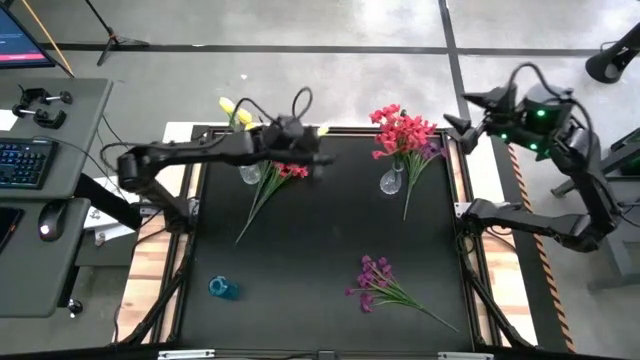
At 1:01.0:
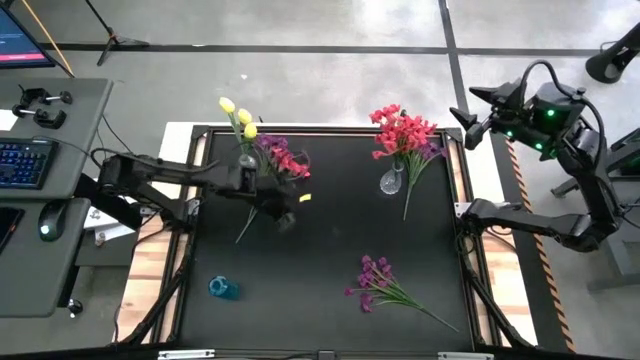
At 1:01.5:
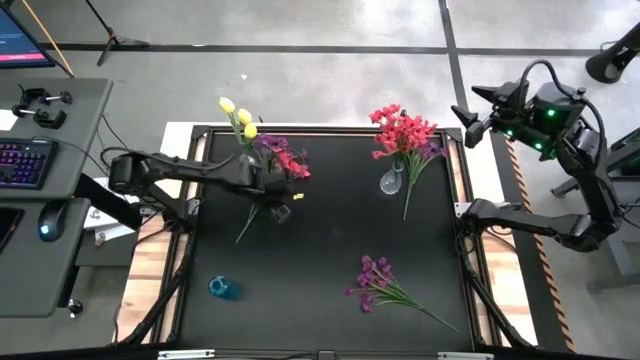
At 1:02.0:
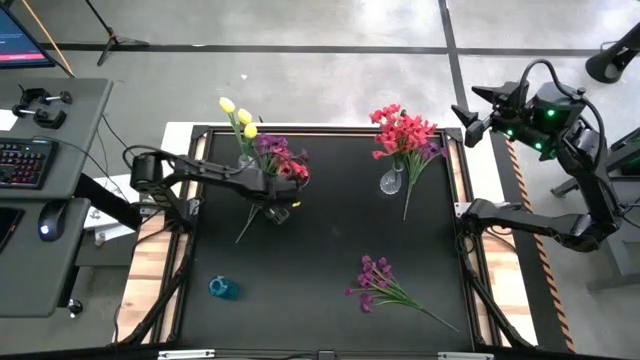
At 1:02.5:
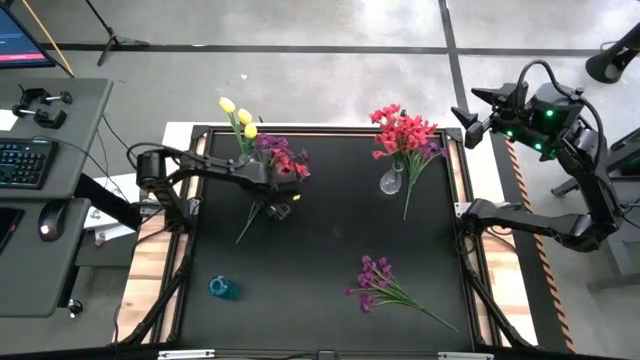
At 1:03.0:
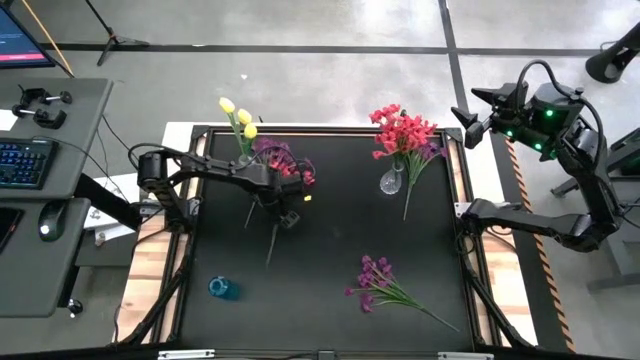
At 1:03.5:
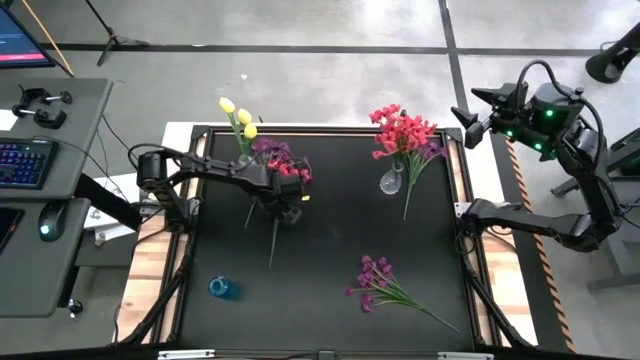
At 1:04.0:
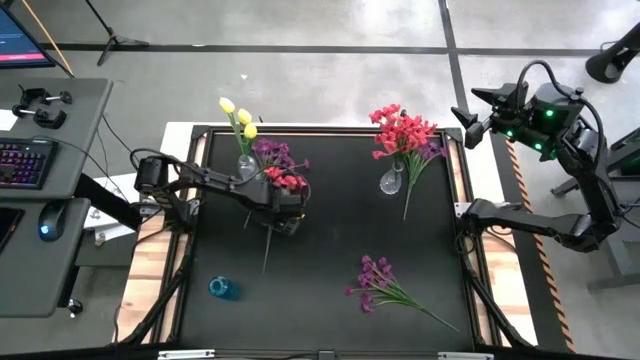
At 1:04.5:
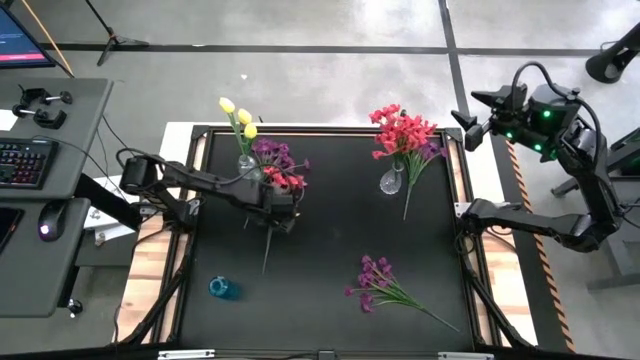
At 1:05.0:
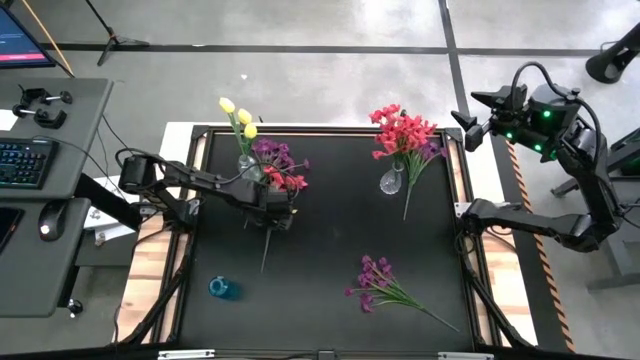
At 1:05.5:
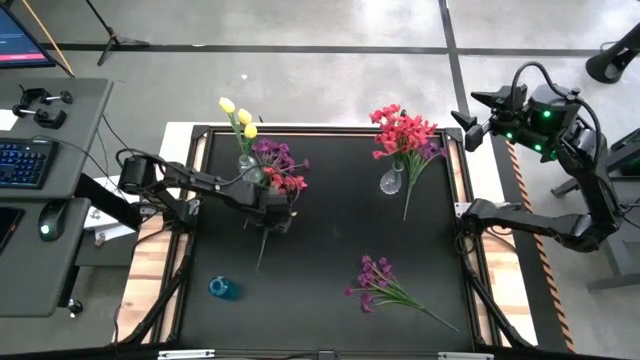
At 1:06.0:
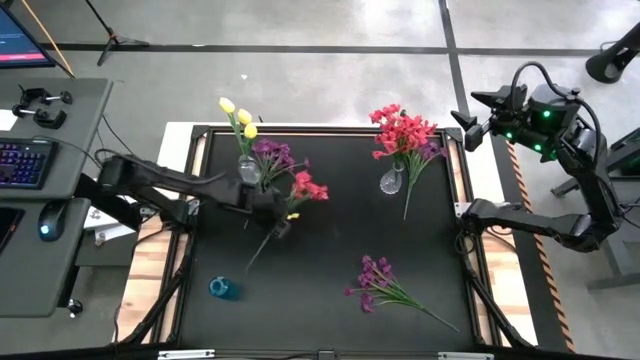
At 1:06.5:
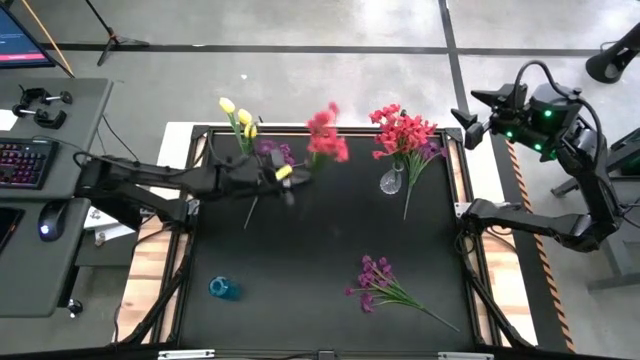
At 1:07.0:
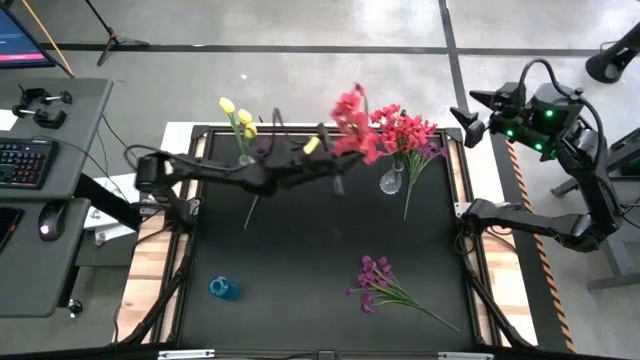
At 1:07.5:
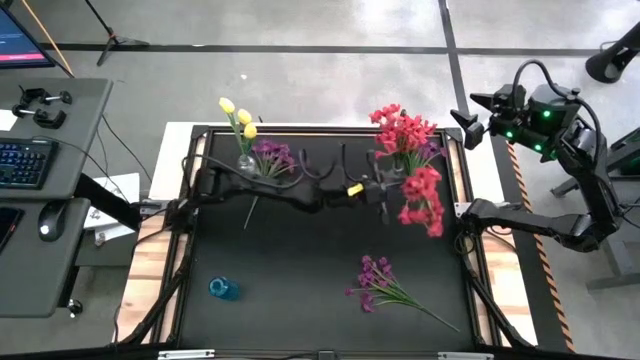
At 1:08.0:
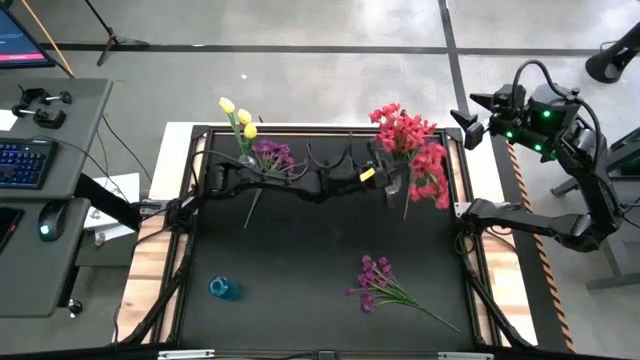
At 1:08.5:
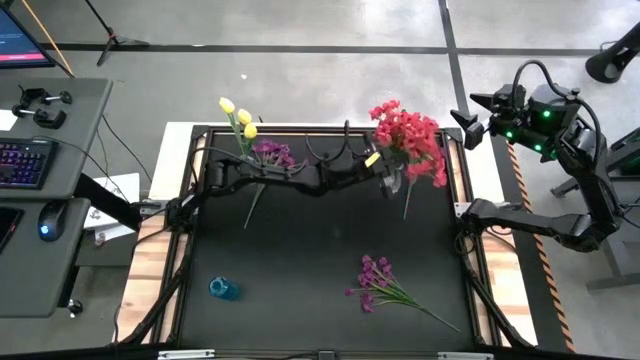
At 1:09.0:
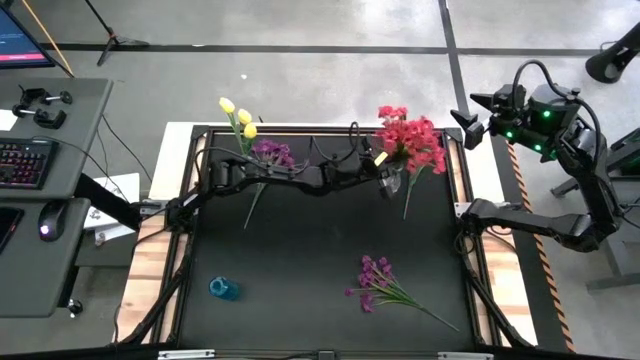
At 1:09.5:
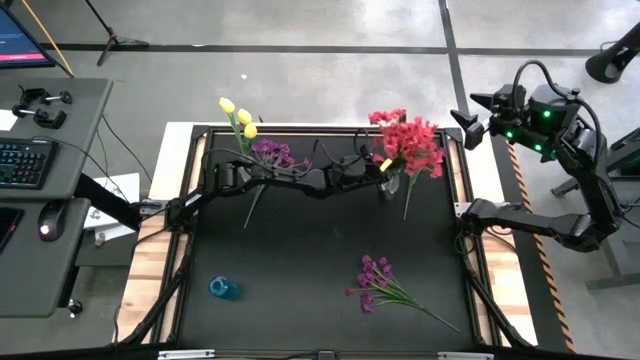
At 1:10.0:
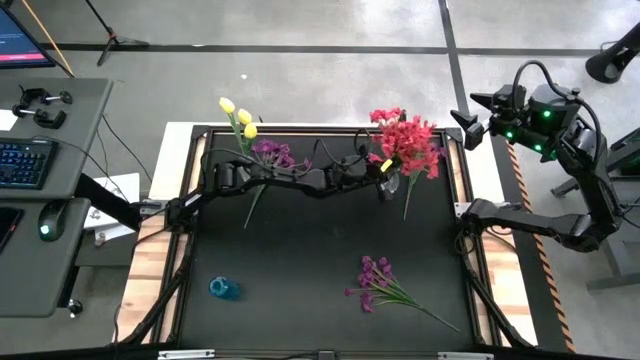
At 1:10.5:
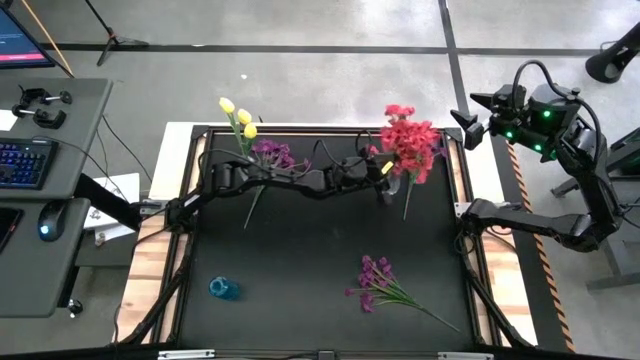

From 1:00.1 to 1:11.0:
Task: Sort flowers into vase by color
Put the red flowers into the right transparent vase

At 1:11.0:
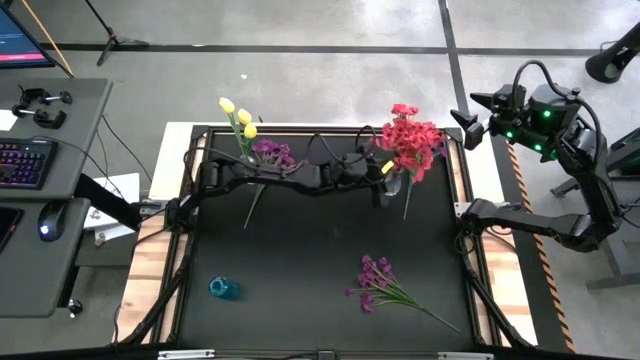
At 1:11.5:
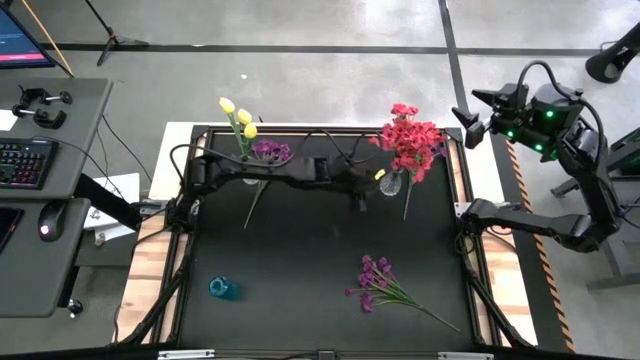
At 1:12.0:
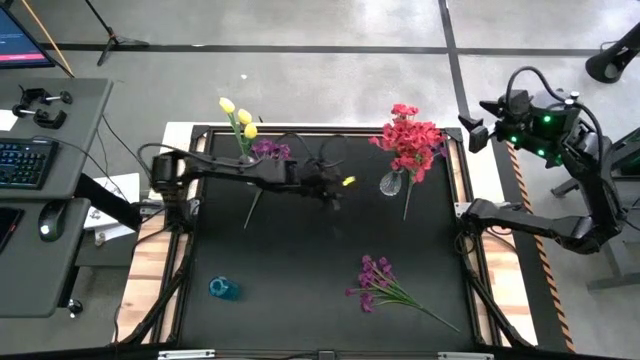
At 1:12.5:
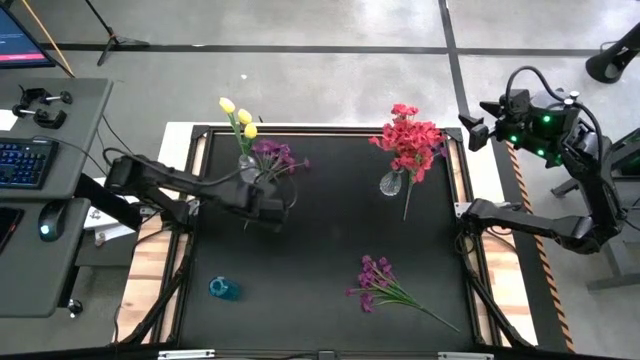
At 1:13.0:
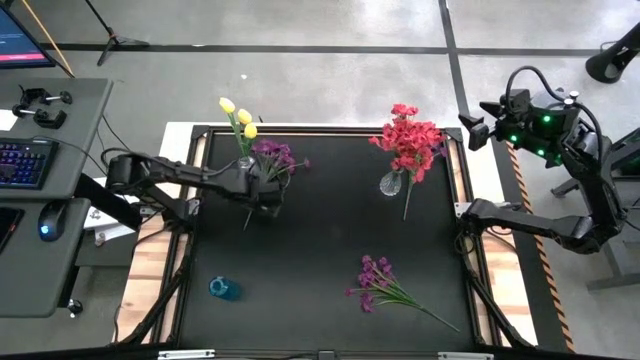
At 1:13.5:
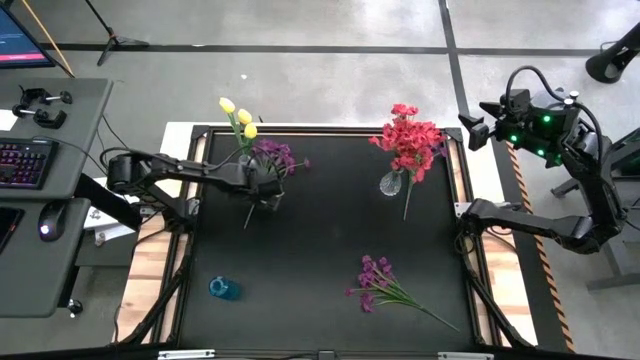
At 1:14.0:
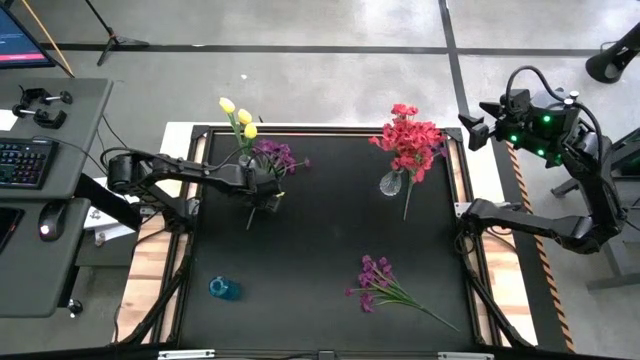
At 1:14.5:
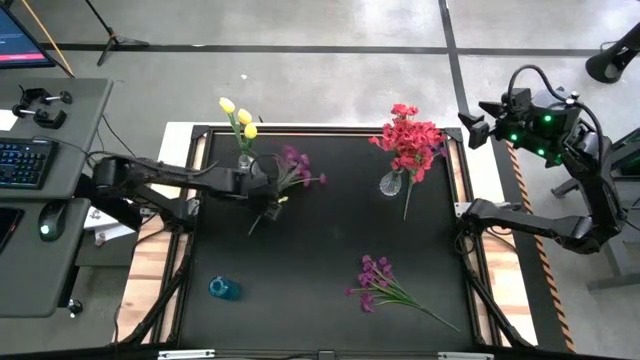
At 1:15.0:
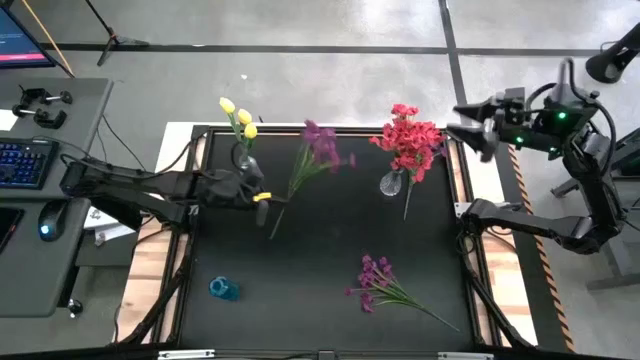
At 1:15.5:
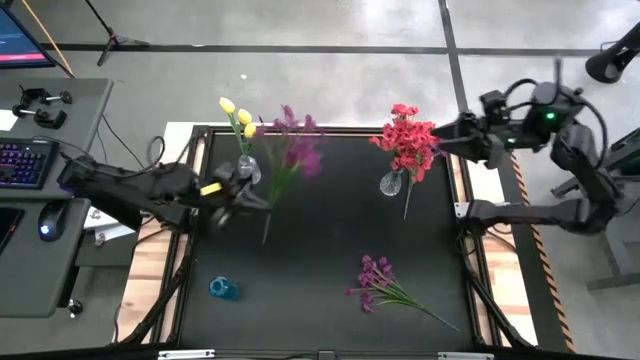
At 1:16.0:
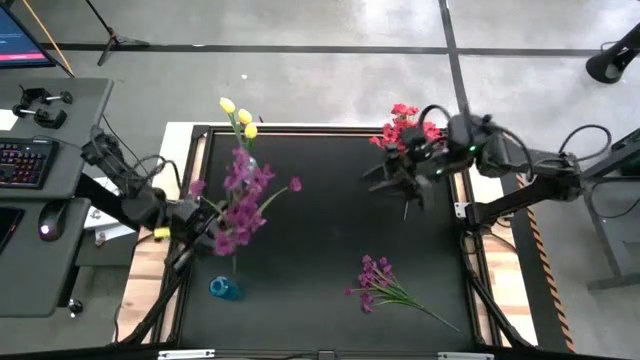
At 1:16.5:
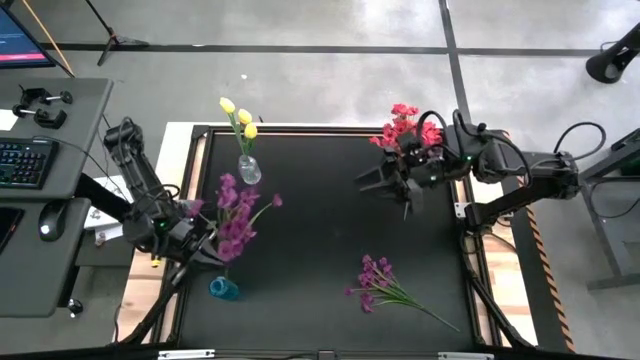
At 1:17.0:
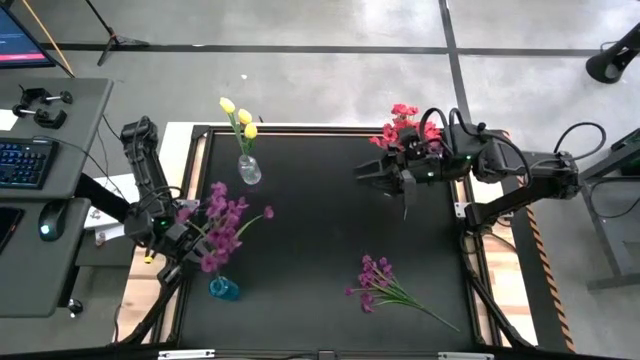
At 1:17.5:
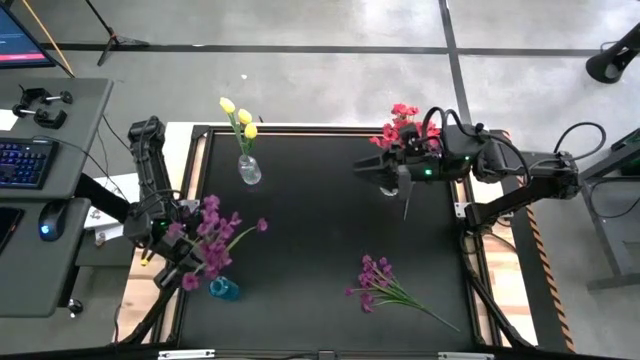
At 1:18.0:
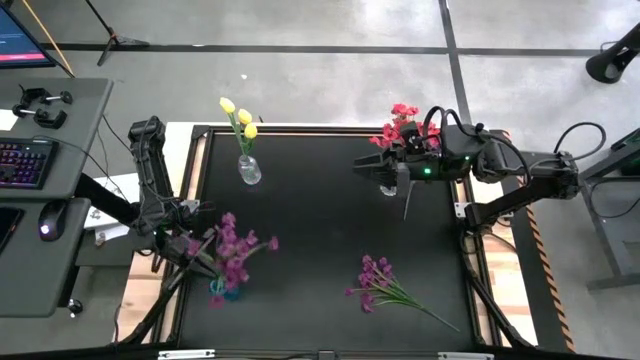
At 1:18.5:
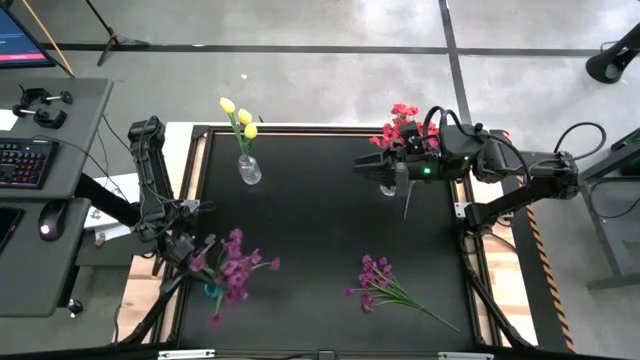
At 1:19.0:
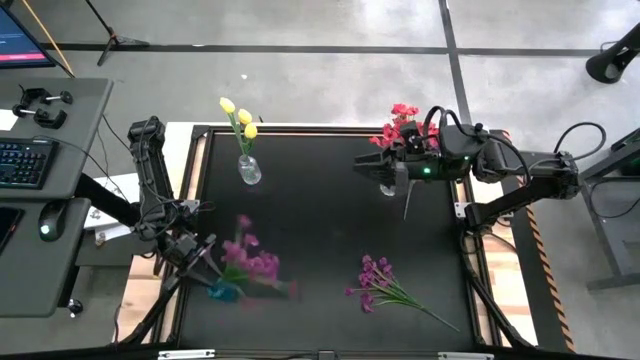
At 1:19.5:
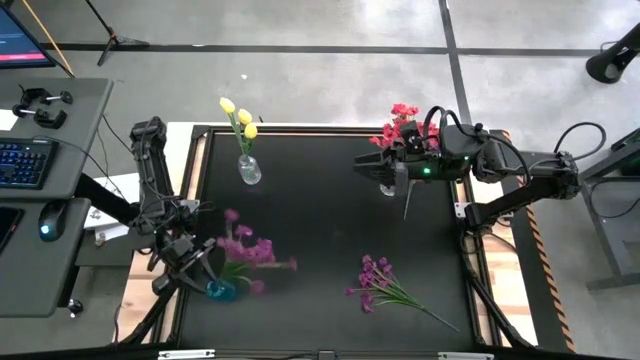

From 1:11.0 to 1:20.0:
Put the top left violet flowers into the blue vase

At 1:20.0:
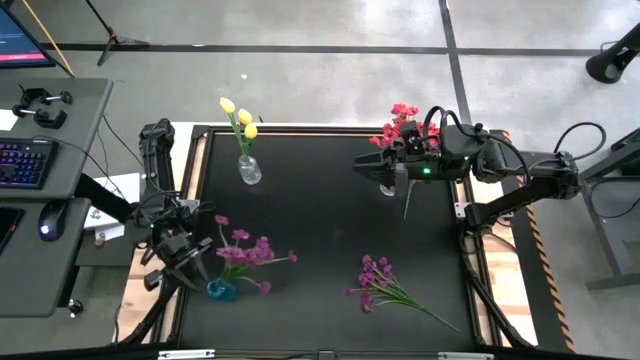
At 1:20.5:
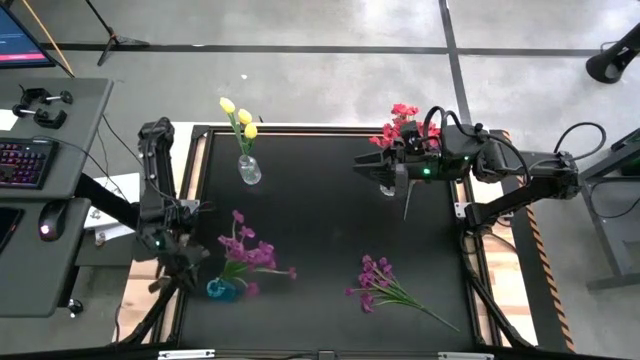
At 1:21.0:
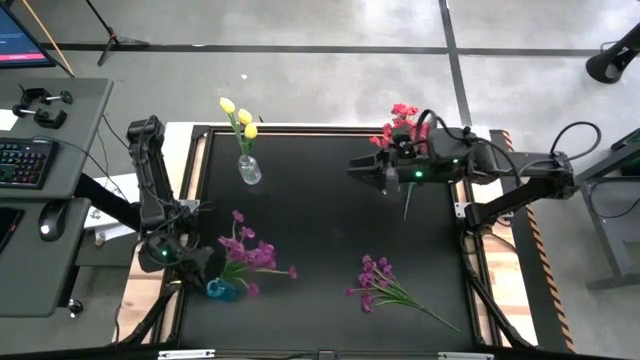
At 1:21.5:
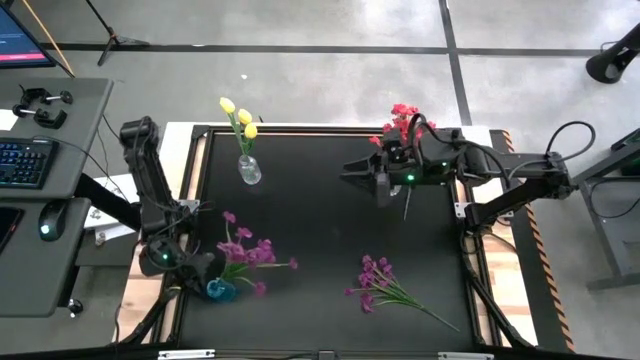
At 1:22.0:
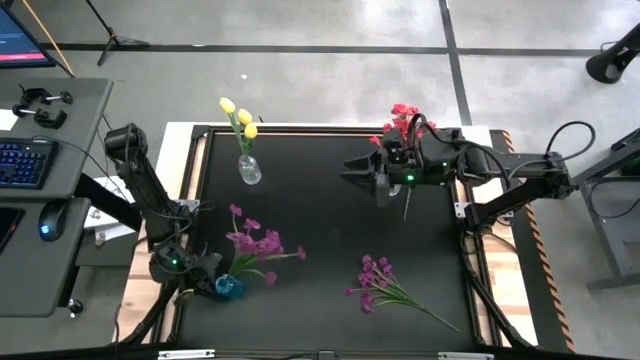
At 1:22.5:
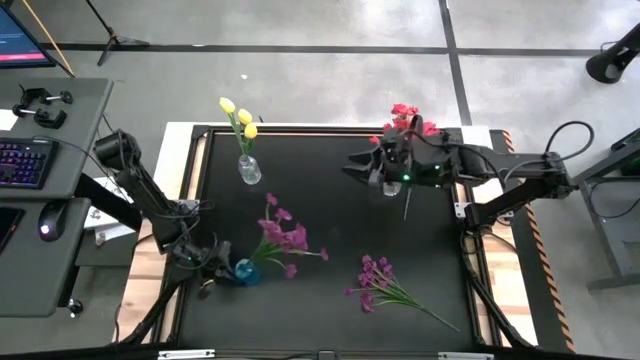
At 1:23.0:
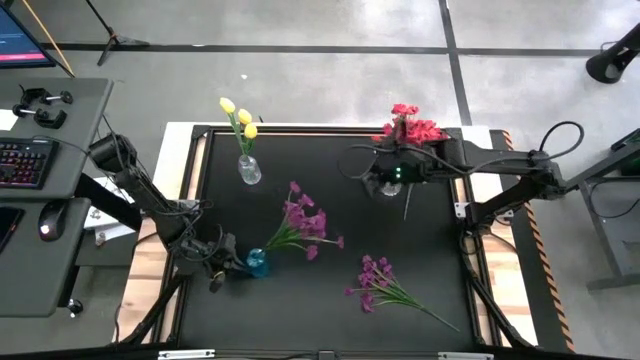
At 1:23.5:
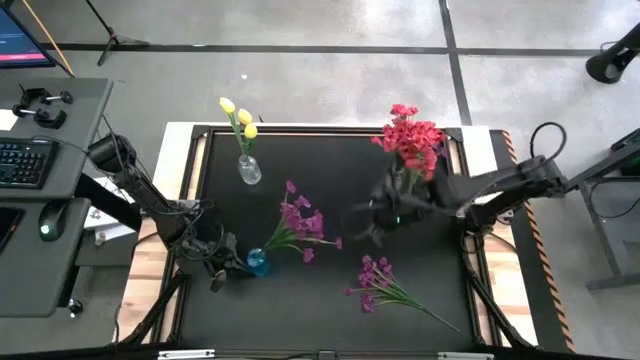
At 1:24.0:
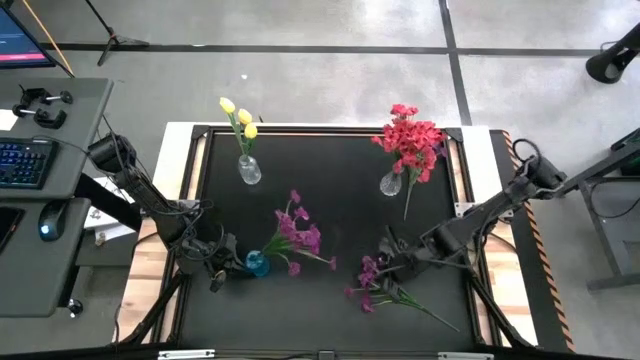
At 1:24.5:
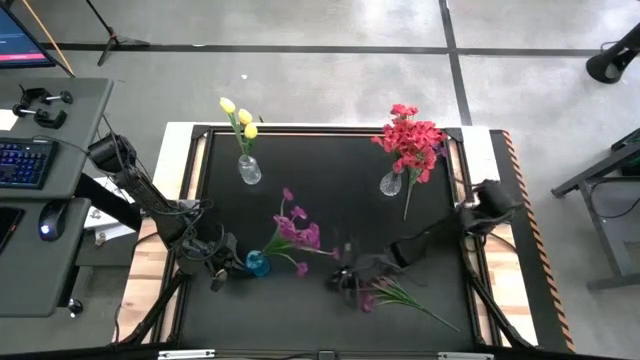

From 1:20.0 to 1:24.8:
Adjust the blue vase
